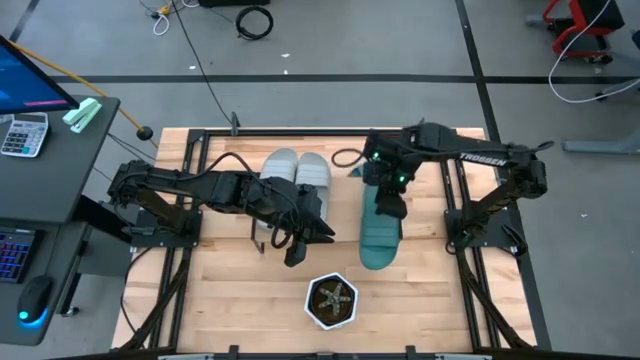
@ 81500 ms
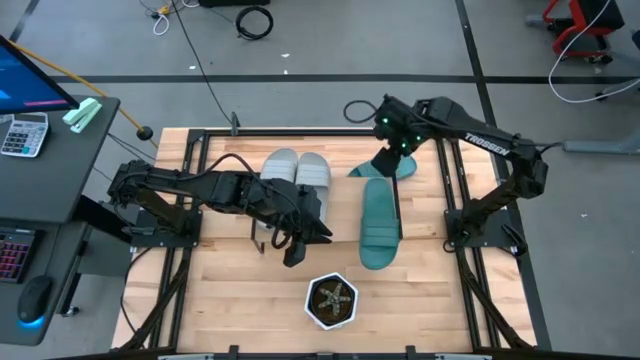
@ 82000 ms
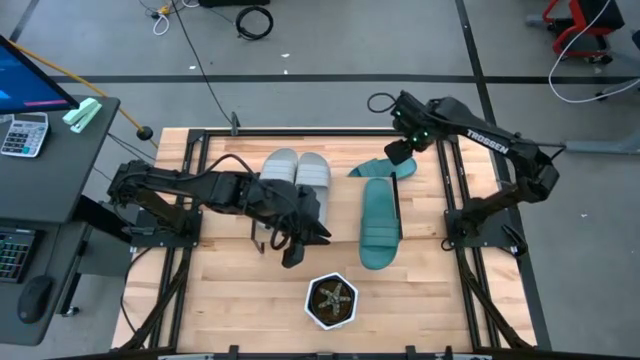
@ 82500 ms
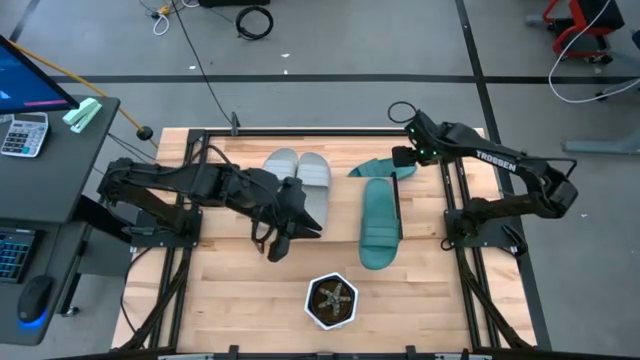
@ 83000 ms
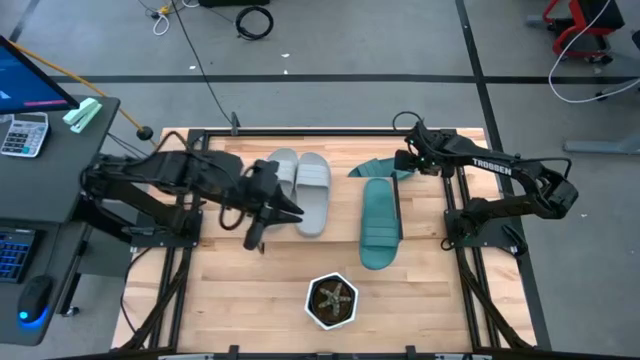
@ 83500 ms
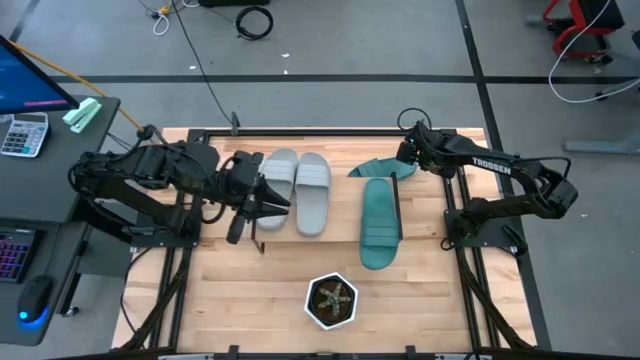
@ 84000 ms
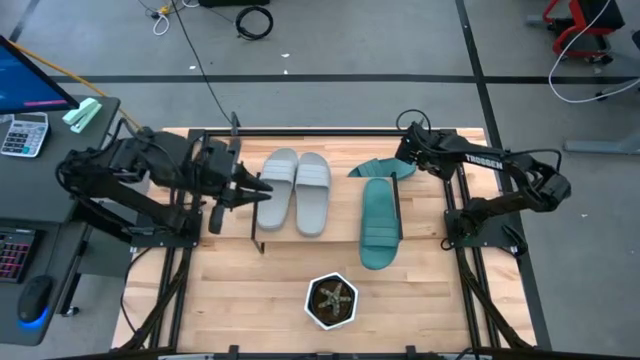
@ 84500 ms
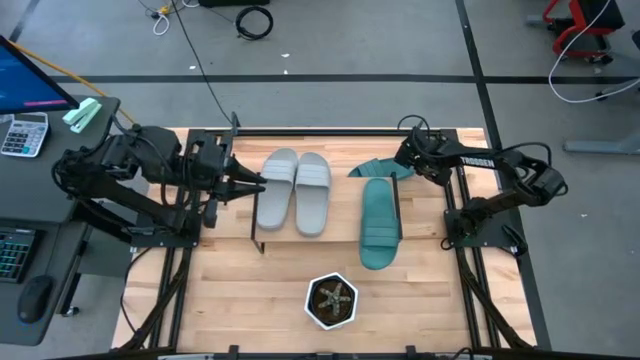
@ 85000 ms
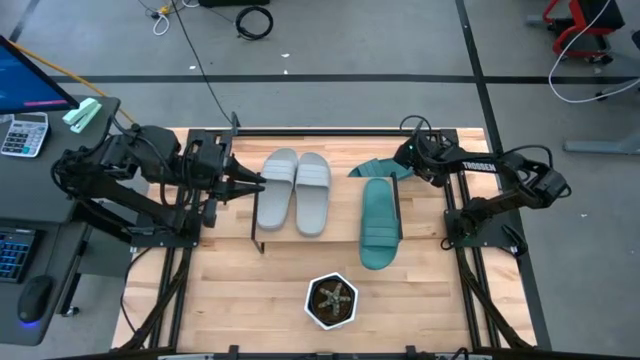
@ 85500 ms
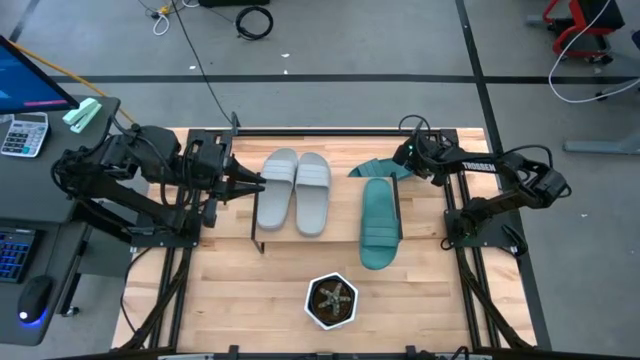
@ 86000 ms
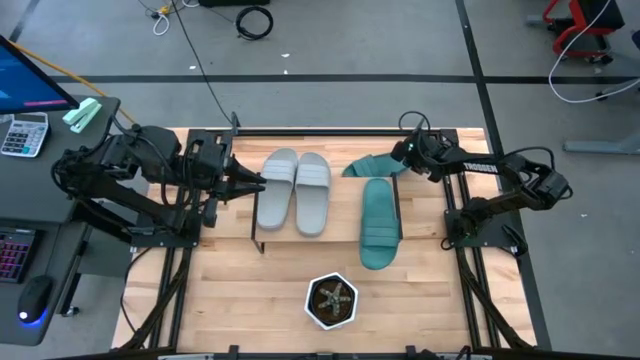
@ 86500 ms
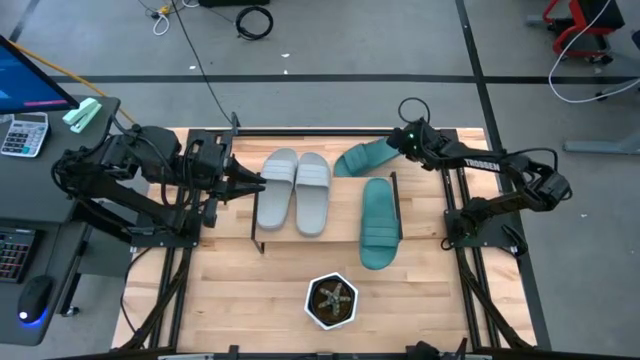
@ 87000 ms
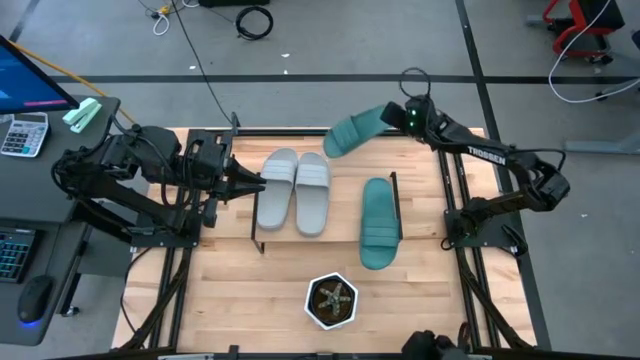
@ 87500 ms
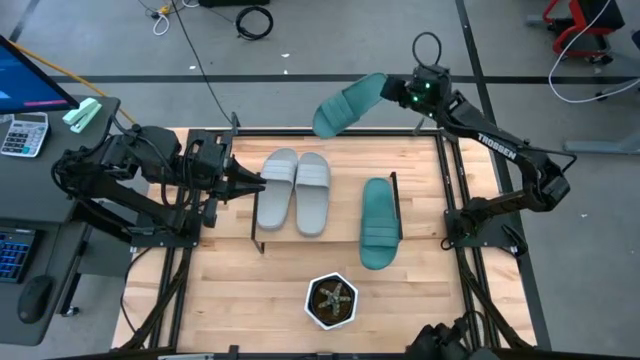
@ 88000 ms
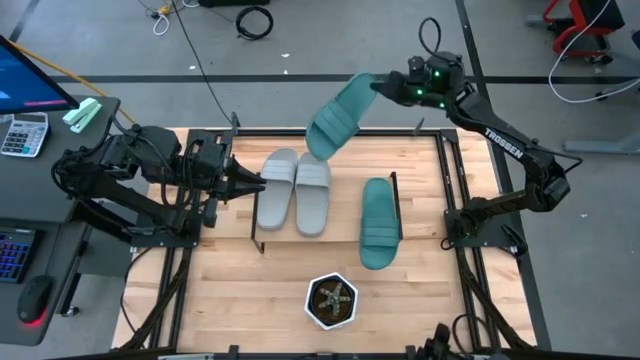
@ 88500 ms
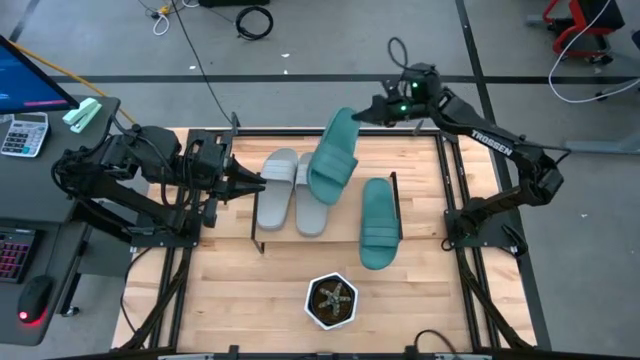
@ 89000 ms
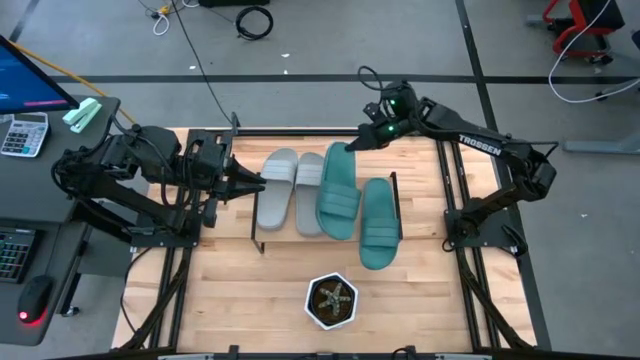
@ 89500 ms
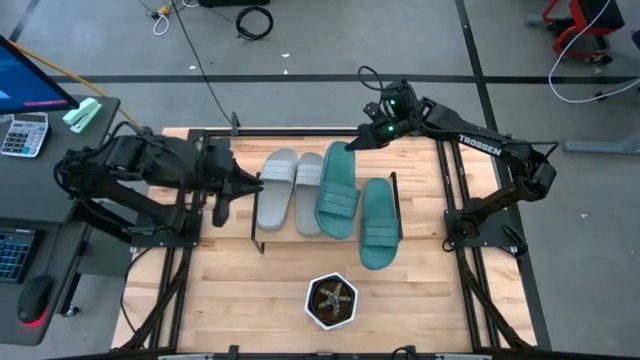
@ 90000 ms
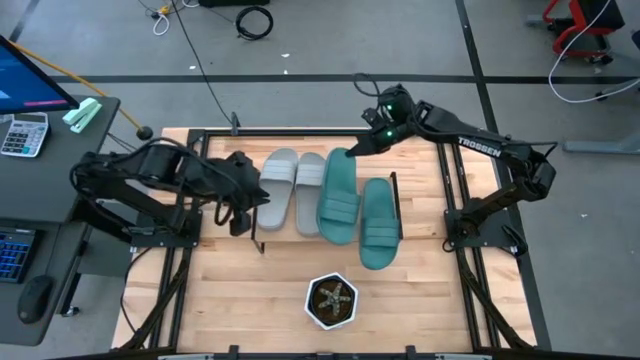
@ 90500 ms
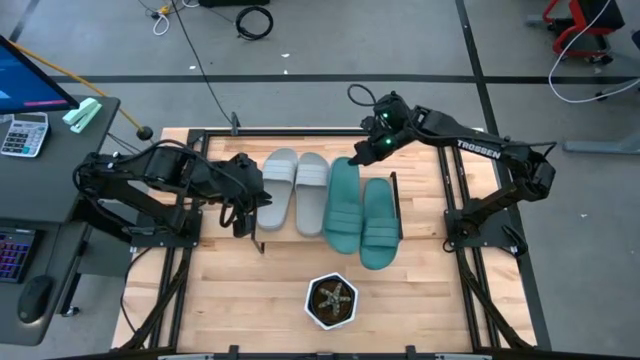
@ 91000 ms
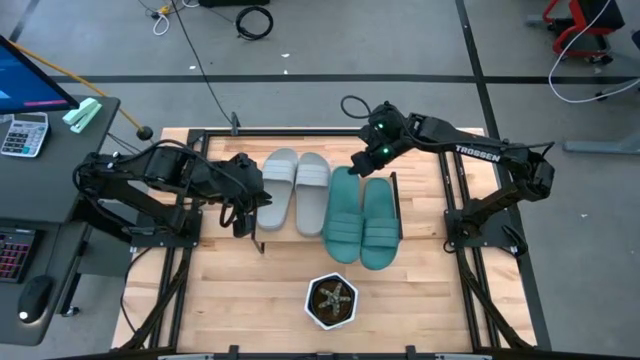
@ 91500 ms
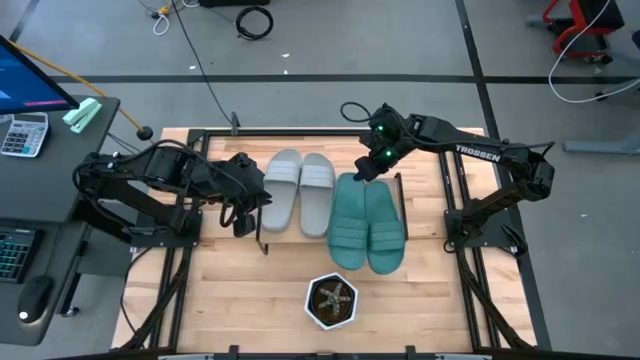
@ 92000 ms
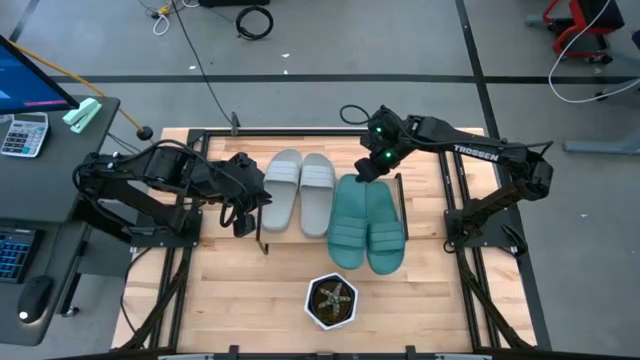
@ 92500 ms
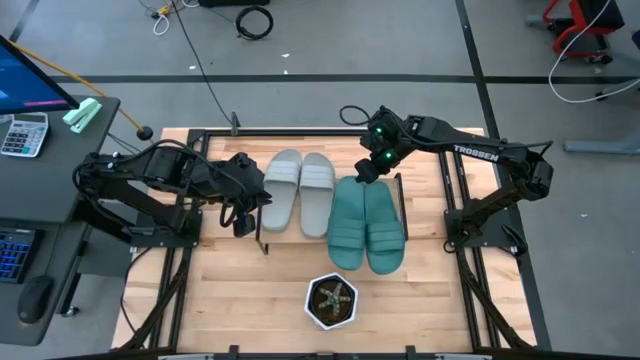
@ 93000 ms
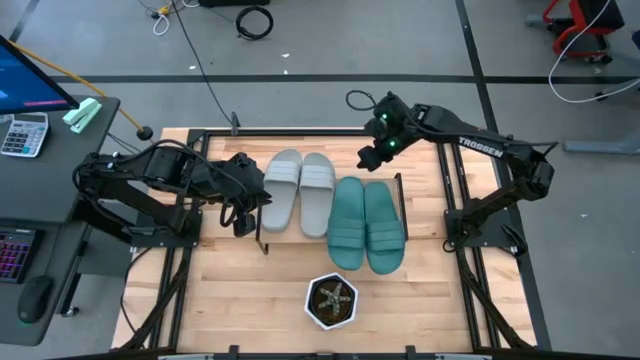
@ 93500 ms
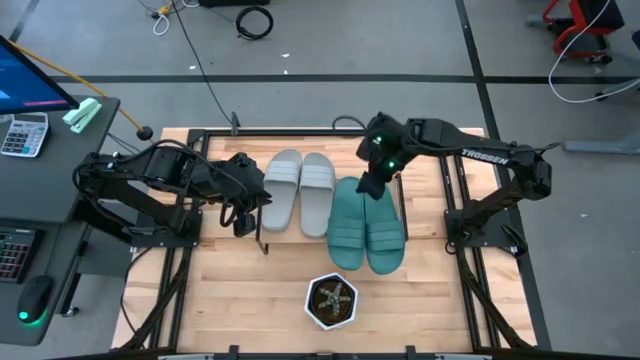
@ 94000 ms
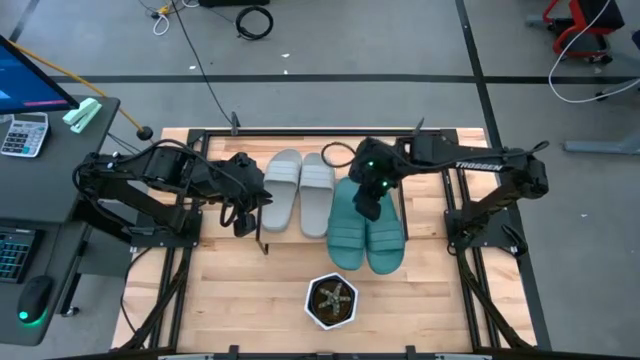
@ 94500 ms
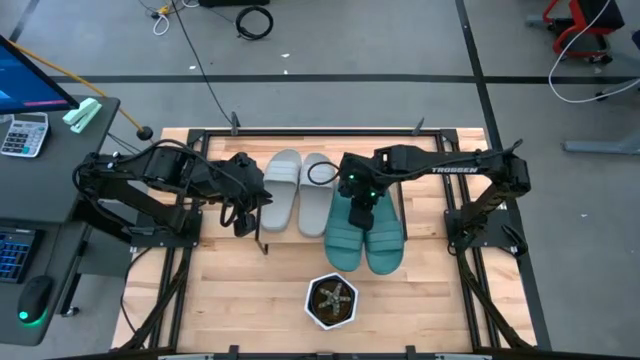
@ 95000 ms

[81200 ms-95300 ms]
Task: Pick and place slides into the shelf
Put the green slide on the shelf aligned with the other green slide

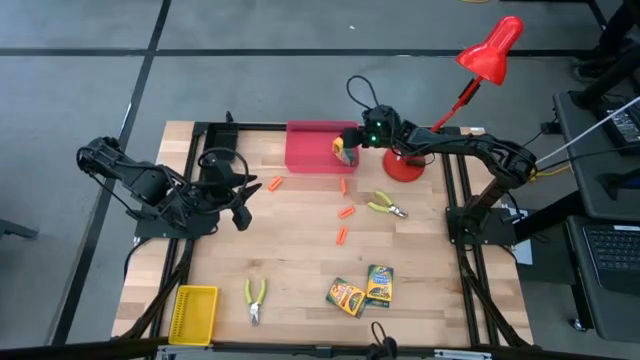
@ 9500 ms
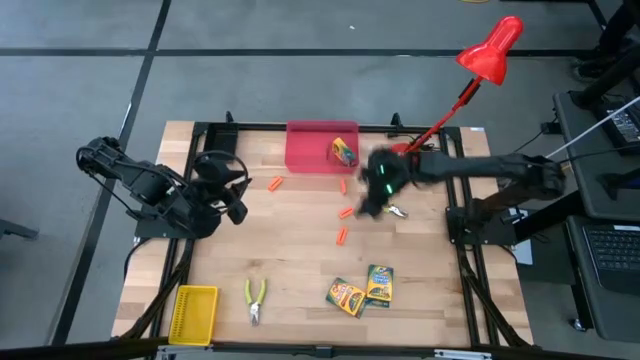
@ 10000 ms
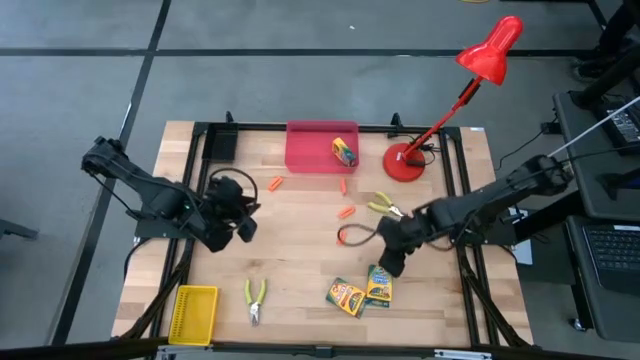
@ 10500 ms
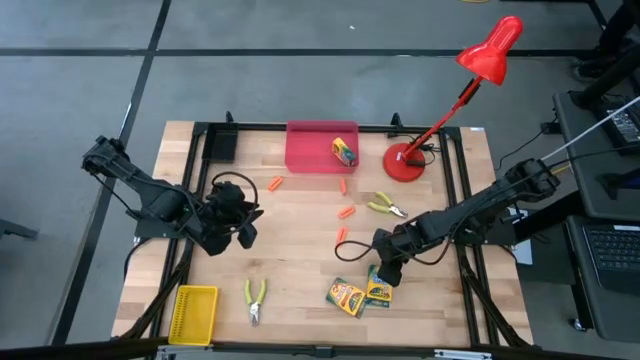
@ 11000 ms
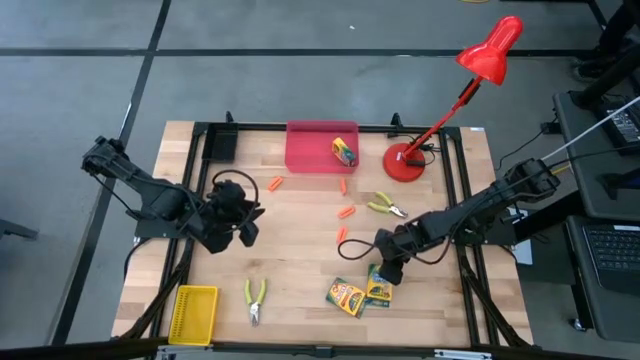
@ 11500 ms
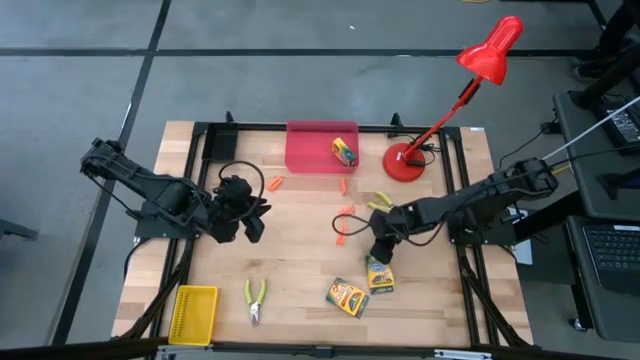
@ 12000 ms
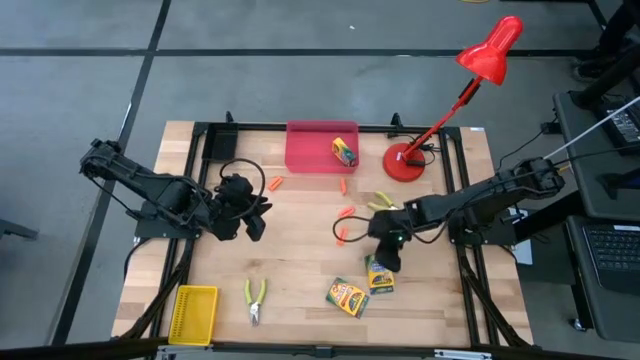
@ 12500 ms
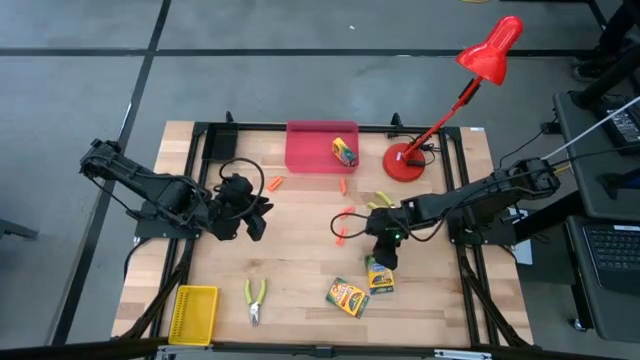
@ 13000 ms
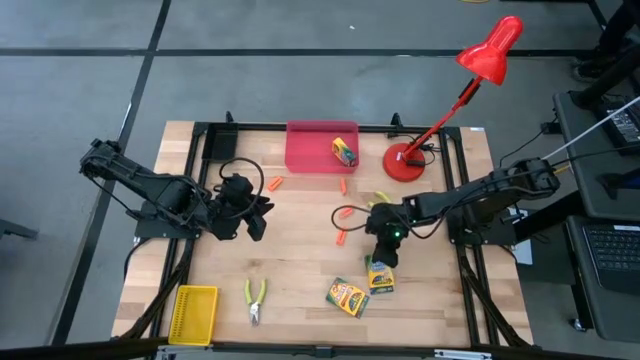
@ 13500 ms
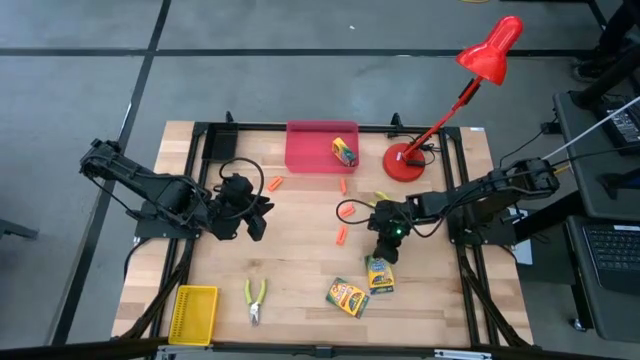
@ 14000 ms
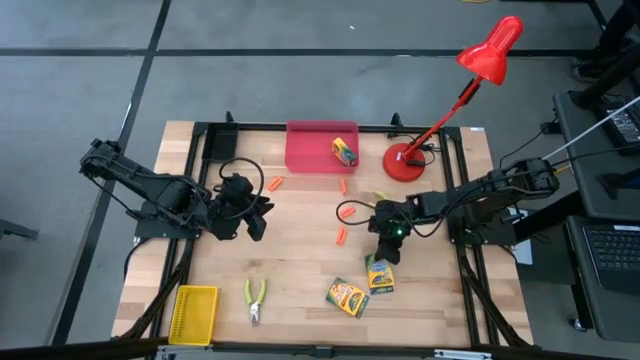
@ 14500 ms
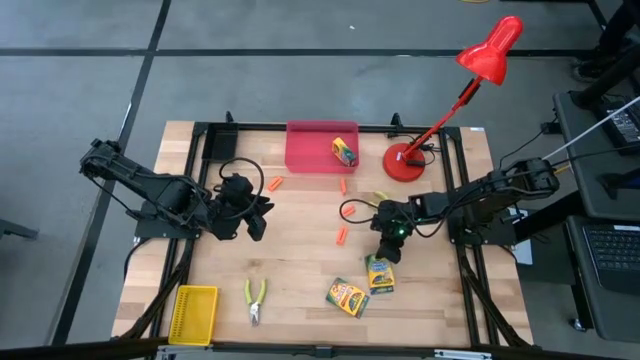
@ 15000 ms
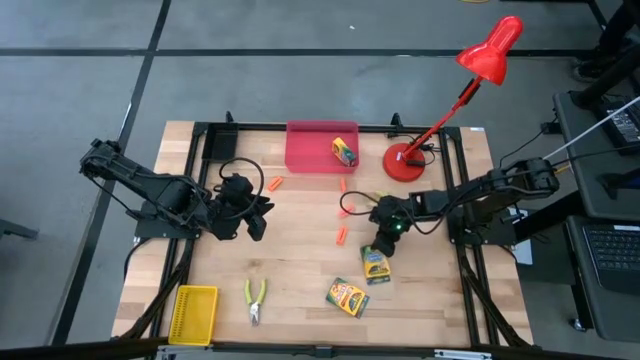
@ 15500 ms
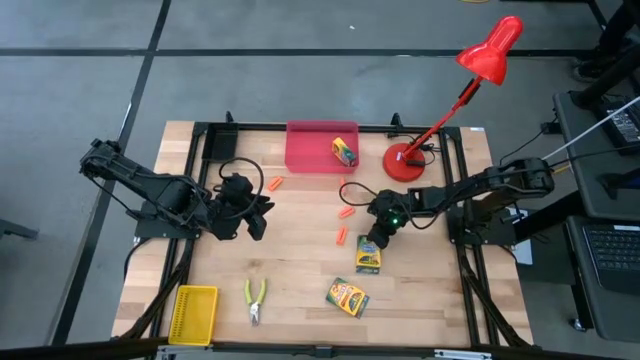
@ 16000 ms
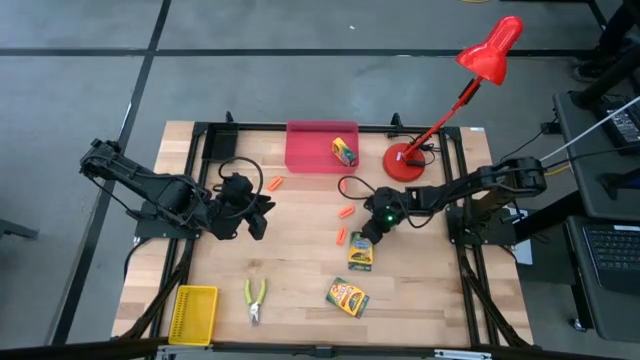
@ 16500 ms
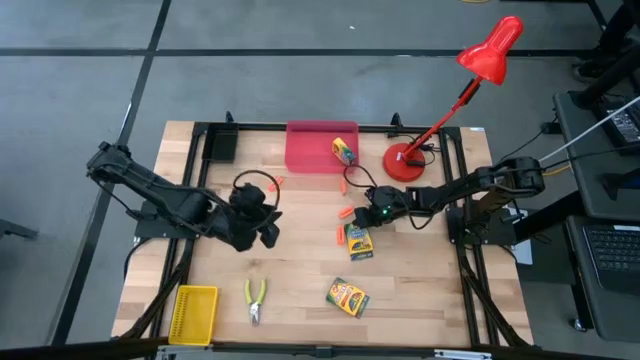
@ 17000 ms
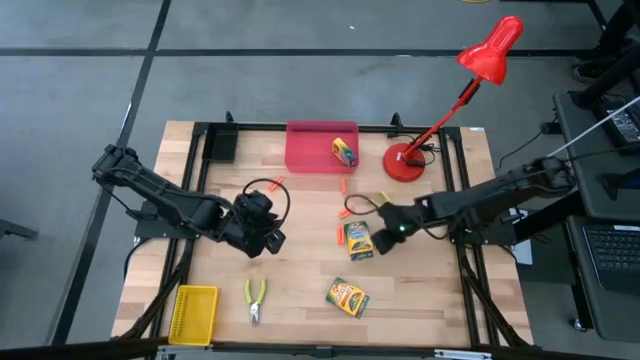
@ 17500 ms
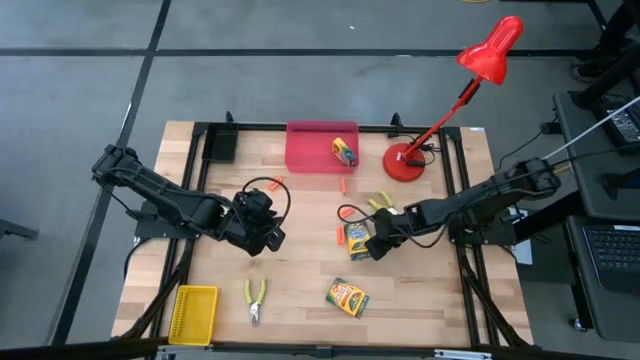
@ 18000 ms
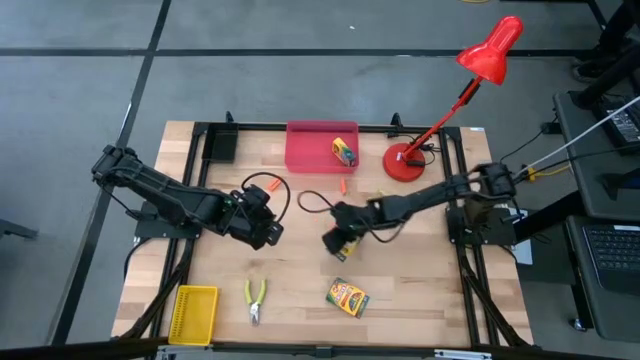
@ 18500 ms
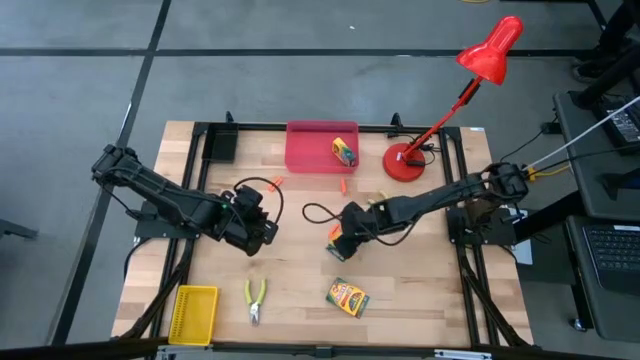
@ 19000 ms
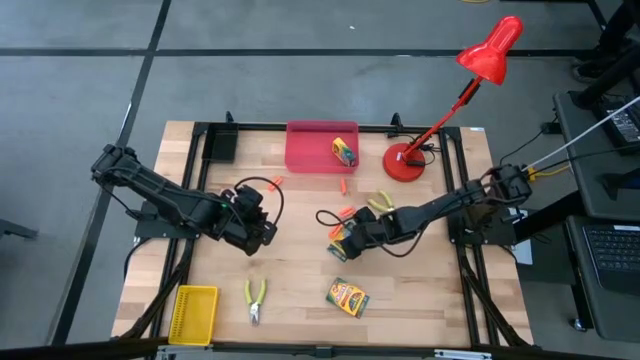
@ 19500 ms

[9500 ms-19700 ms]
Task: Pick & Place School Supplies
Put the yellow crayon box into the red bin
